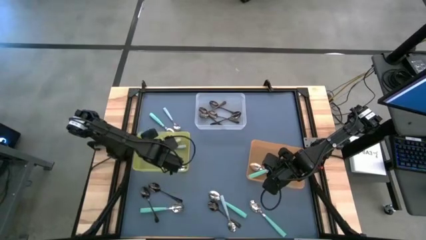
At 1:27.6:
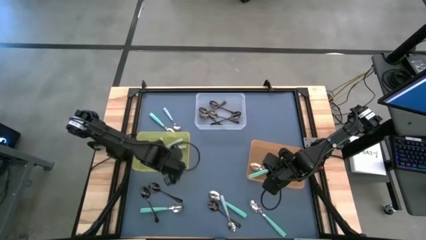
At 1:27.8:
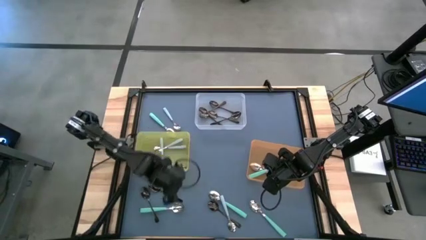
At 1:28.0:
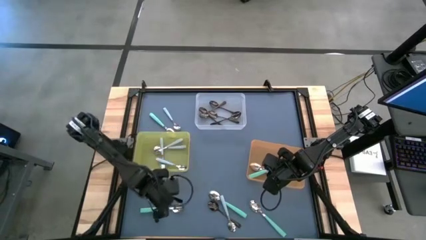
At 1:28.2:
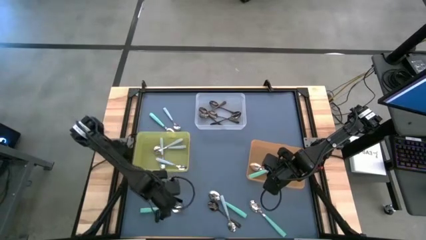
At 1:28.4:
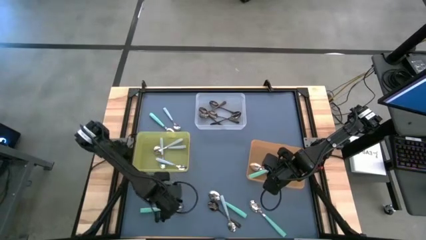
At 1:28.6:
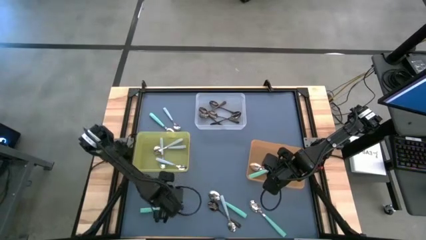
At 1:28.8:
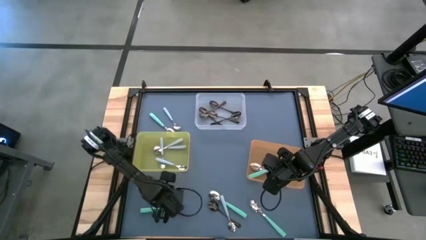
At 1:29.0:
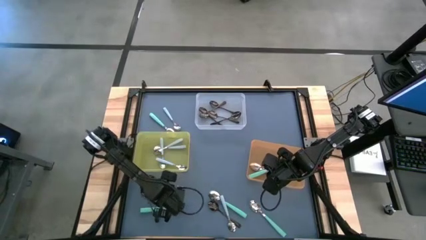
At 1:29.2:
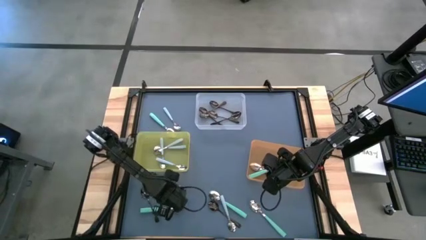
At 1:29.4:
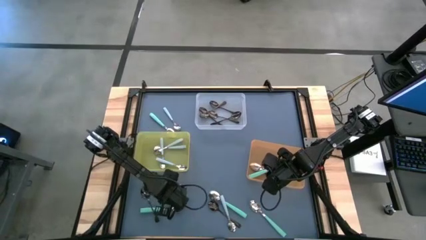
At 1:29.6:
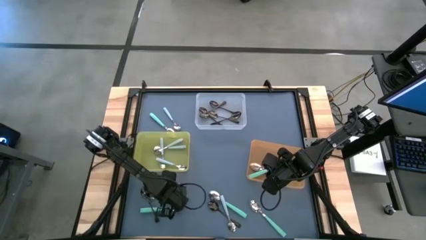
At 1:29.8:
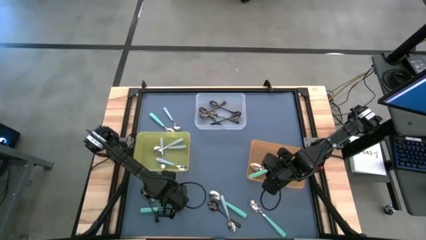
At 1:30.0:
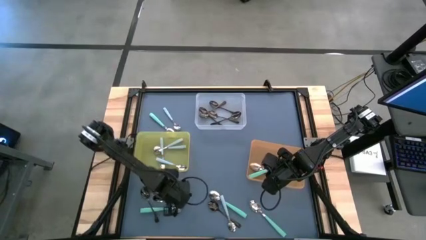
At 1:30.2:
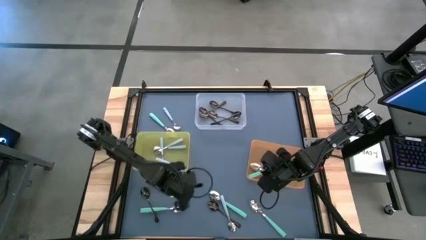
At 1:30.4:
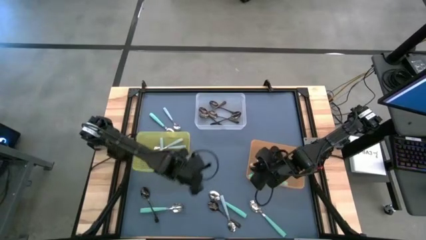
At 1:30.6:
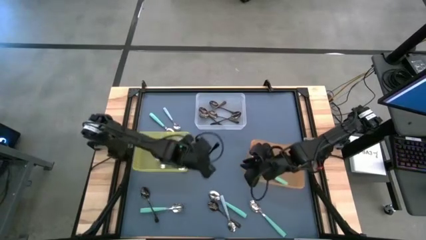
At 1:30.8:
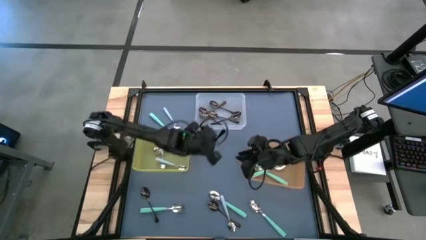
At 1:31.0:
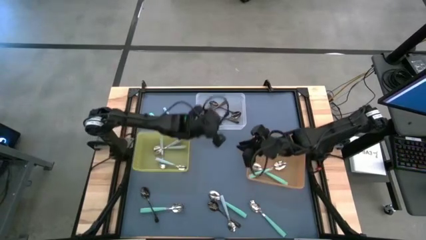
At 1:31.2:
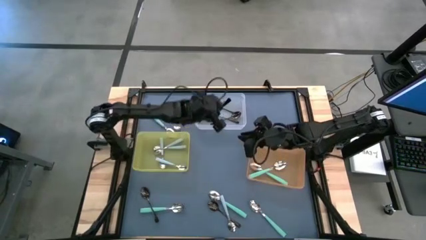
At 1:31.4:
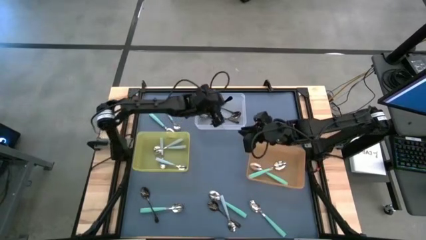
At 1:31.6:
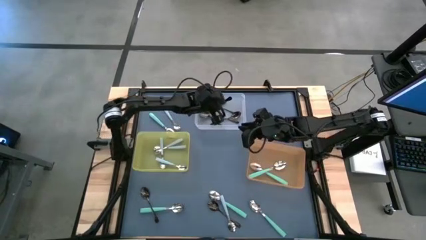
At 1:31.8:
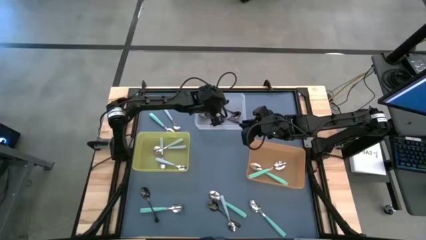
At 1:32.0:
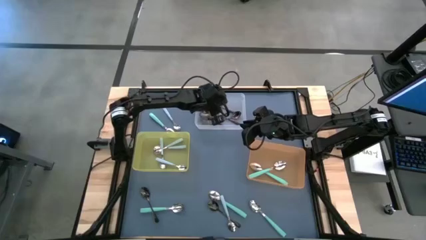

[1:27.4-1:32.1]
Task: Sort silverware by color (type)
Put the black spoon into the transparent bin

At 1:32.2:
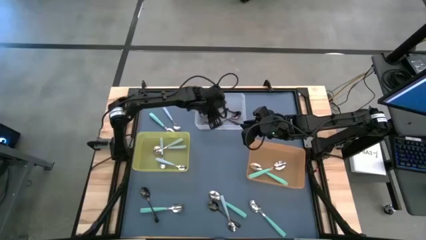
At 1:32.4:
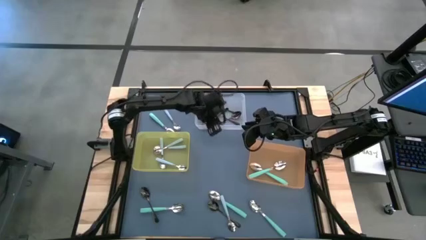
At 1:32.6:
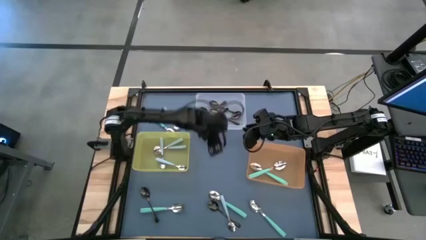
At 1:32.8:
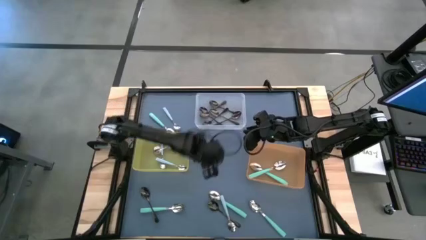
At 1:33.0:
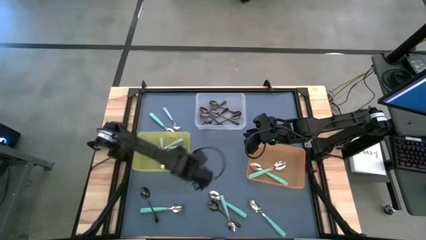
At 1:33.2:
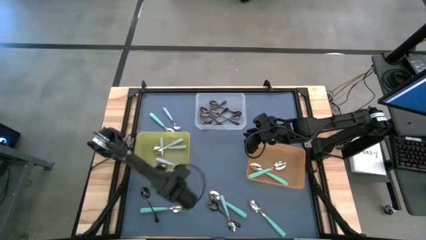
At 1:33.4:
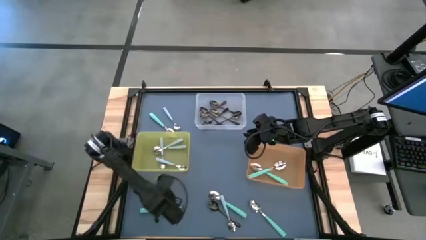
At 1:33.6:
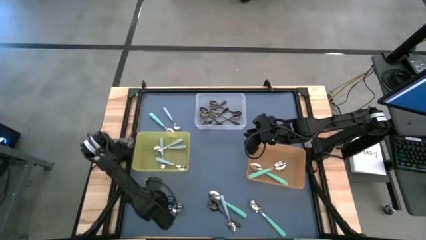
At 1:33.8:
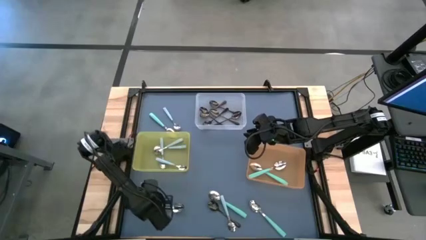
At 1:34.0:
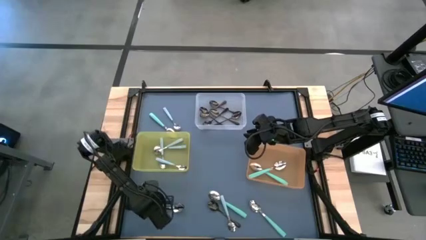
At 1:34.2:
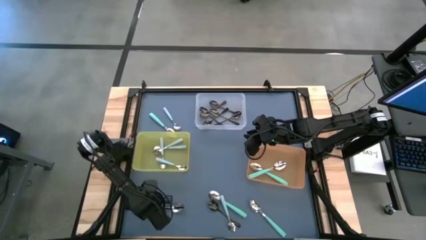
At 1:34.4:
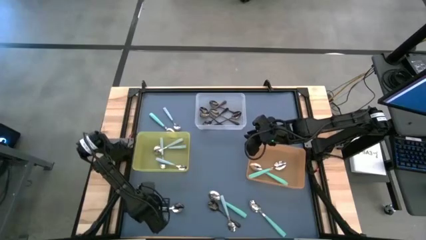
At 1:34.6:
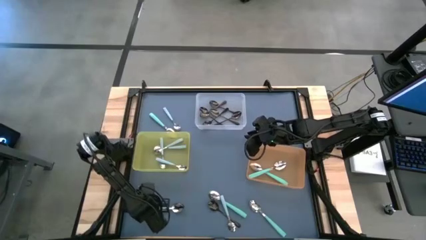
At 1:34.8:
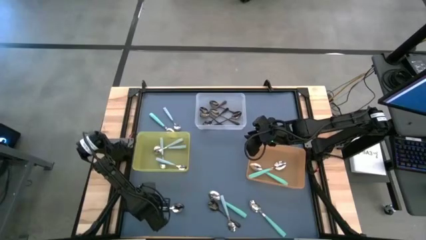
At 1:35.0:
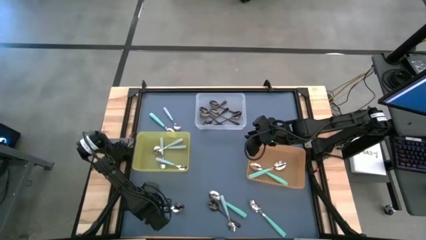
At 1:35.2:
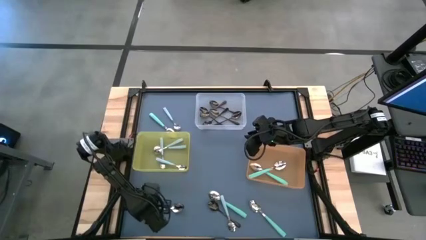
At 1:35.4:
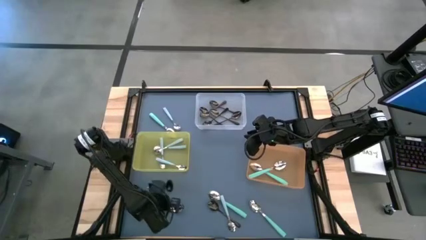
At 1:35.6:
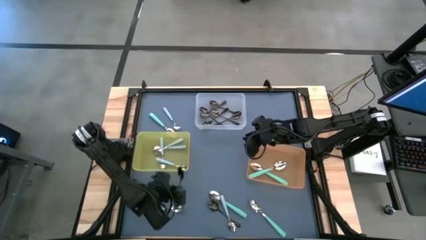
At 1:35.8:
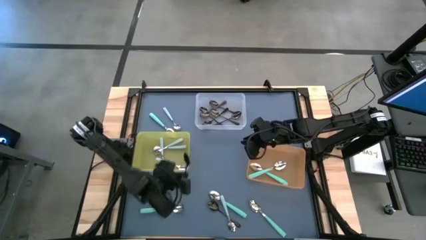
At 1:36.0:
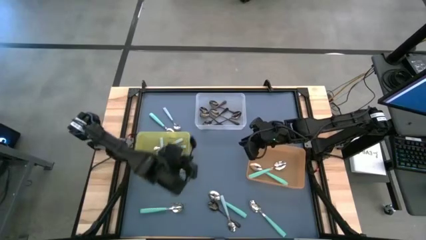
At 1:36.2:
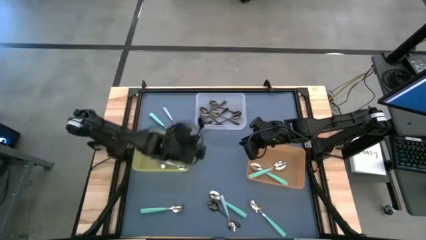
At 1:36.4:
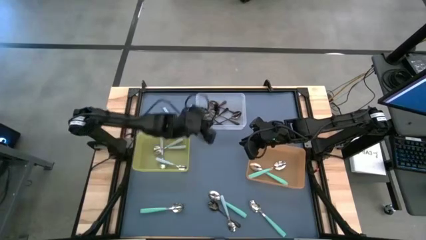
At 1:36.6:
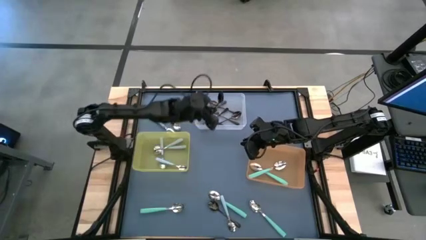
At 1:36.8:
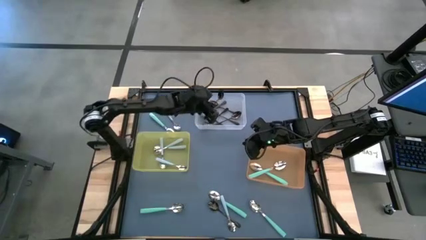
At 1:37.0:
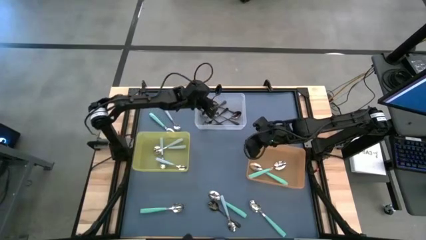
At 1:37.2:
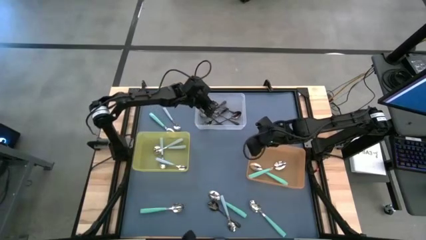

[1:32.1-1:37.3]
Put the black spoon into the transparent bin

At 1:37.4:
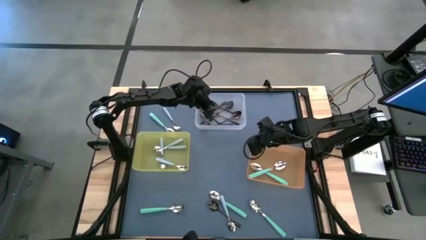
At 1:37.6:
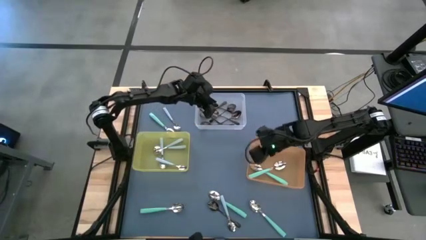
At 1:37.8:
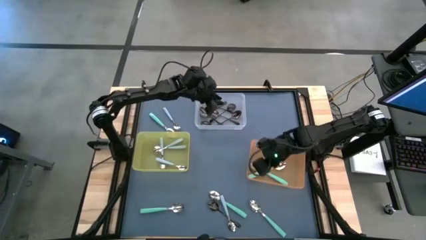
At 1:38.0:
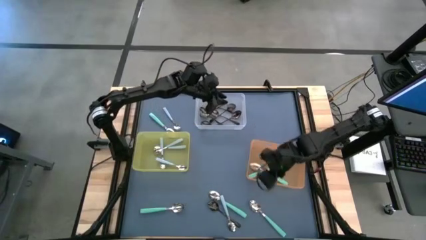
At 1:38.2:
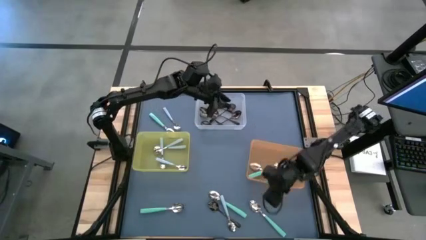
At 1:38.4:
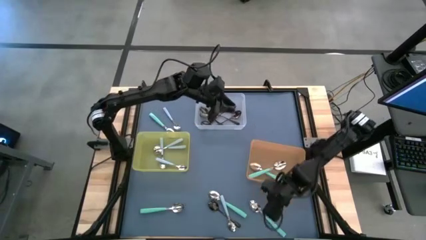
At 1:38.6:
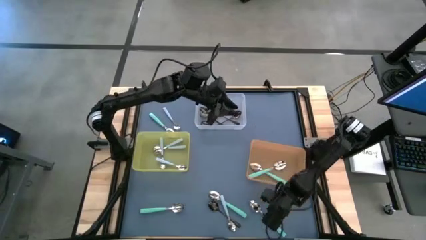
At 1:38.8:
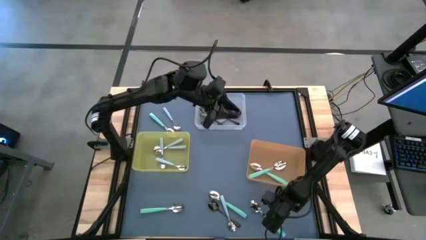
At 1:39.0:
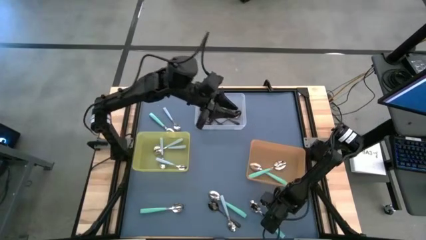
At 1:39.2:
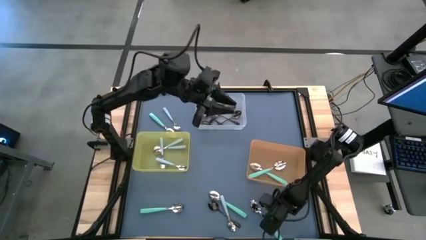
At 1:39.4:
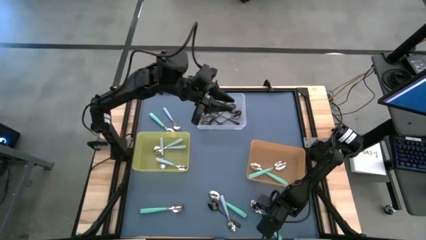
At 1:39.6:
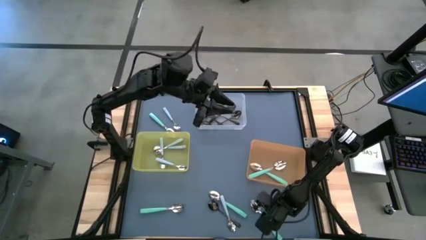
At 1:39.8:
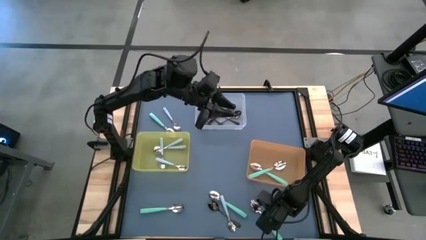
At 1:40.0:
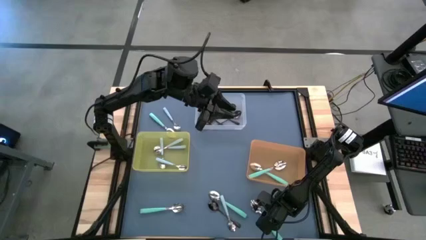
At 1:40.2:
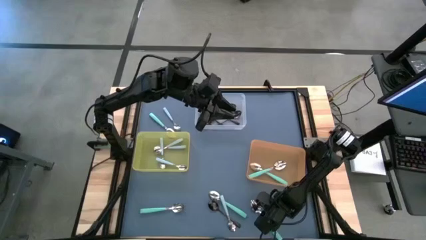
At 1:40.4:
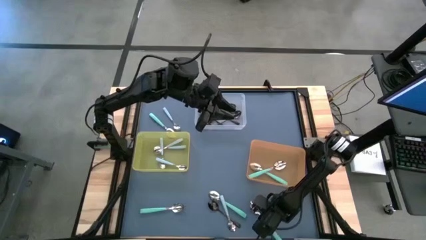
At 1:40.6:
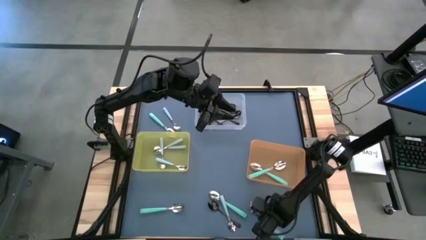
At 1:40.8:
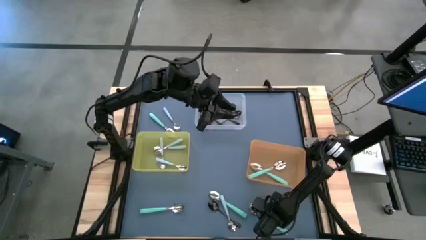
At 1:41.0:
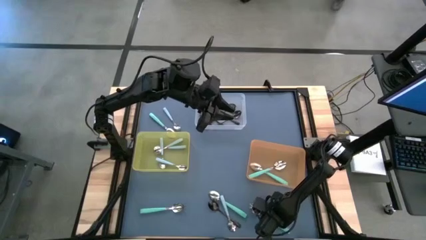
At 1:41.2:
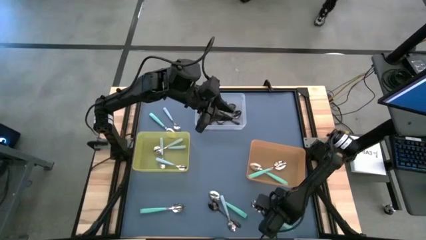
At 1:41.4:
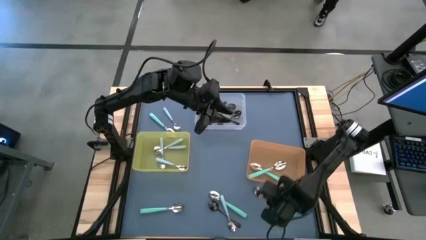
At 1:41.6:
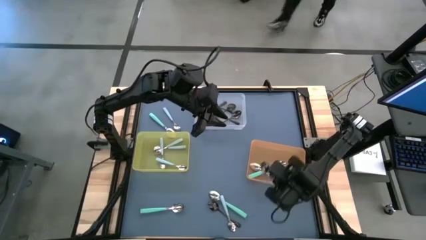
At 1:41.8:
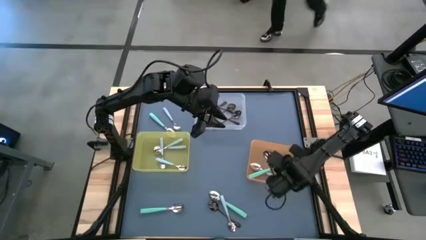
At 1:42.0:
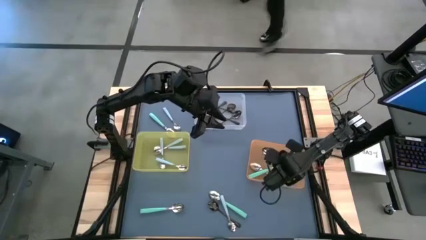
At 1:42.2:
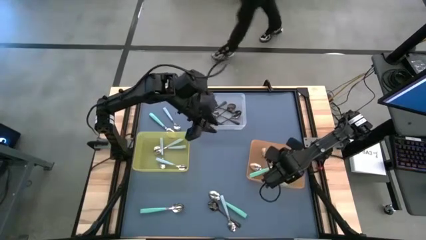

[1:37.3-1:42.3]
Put the green spoon into the orange bin
